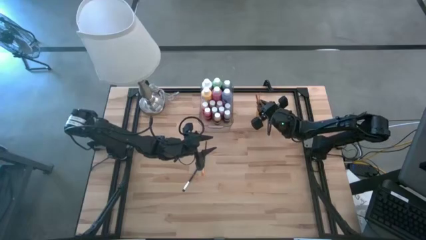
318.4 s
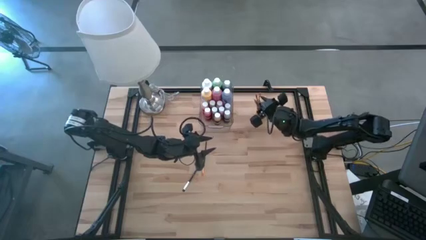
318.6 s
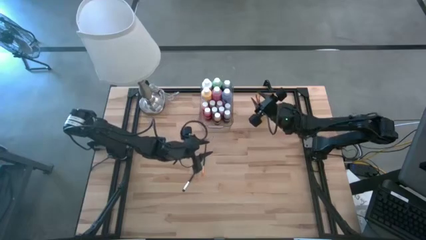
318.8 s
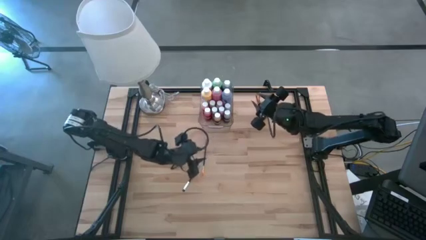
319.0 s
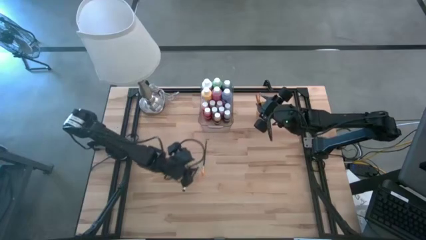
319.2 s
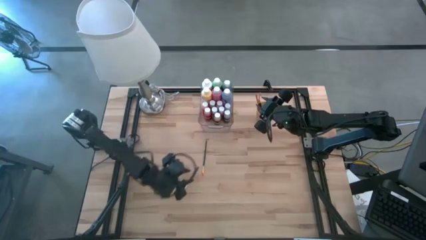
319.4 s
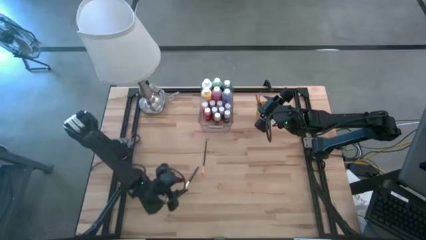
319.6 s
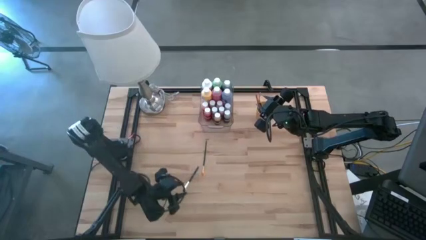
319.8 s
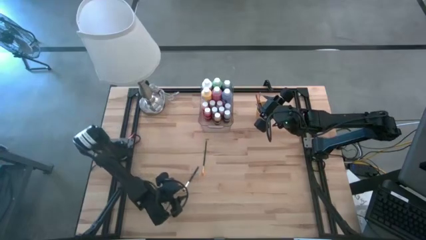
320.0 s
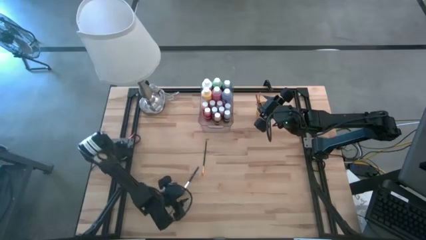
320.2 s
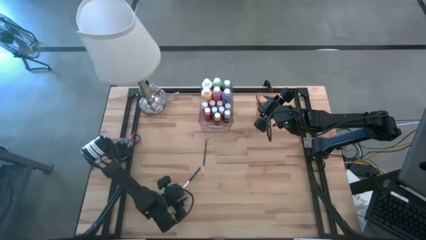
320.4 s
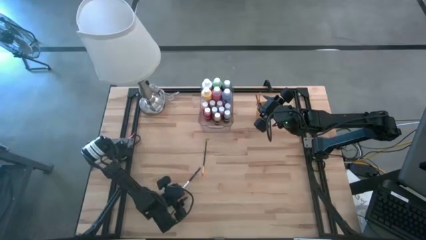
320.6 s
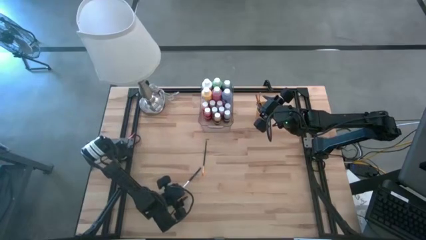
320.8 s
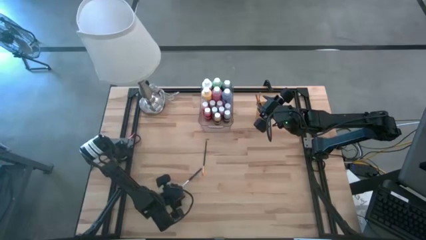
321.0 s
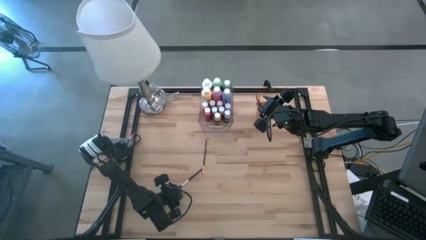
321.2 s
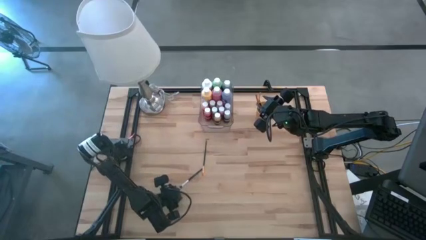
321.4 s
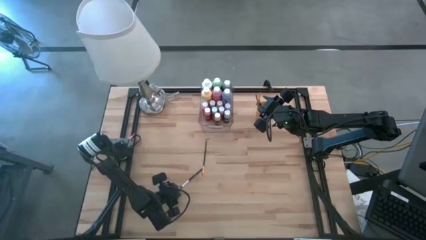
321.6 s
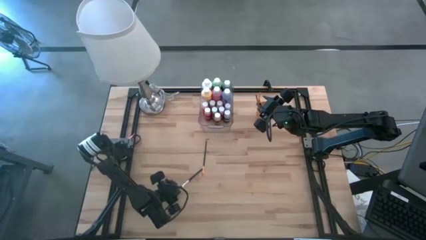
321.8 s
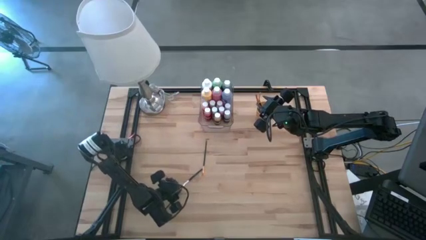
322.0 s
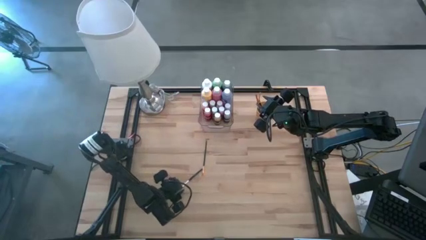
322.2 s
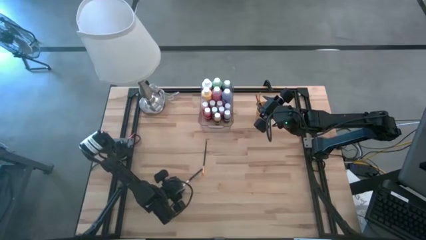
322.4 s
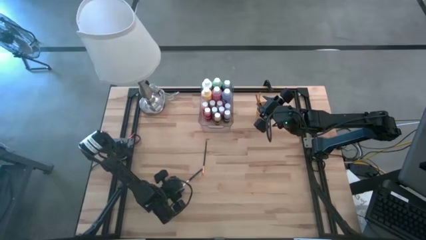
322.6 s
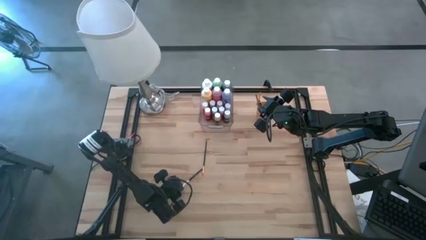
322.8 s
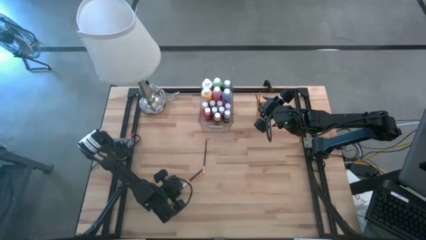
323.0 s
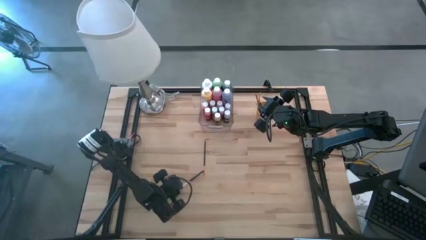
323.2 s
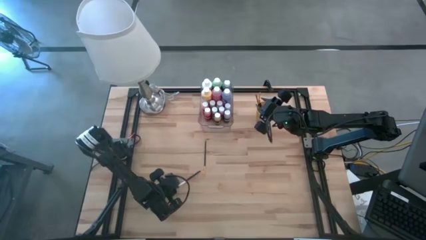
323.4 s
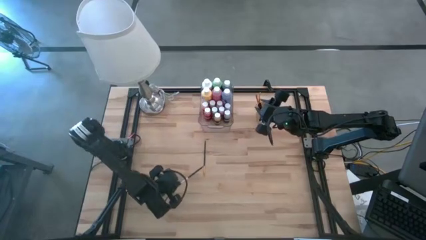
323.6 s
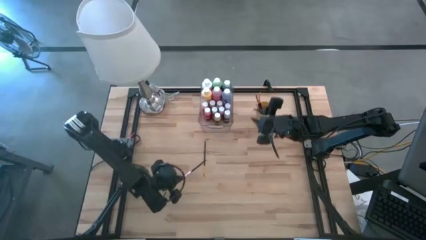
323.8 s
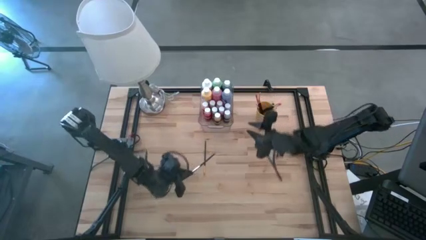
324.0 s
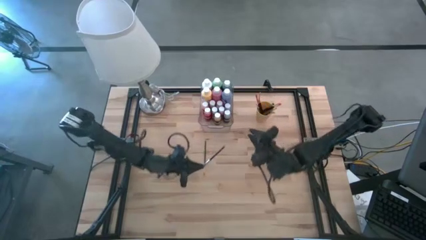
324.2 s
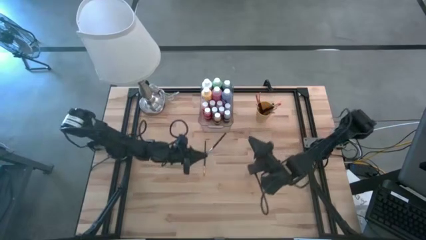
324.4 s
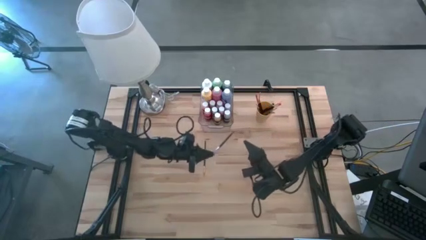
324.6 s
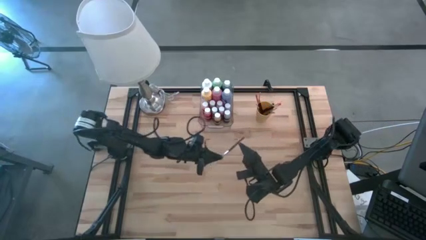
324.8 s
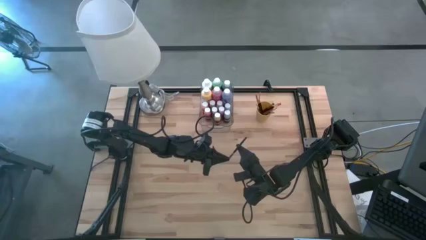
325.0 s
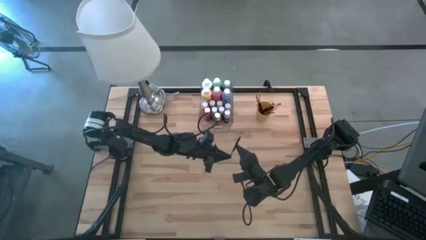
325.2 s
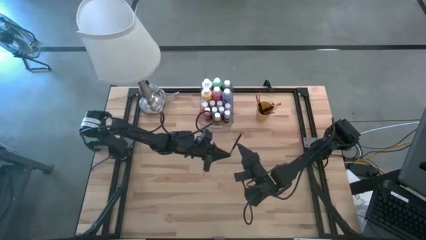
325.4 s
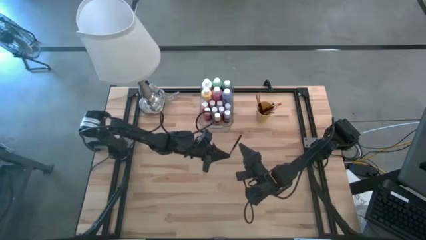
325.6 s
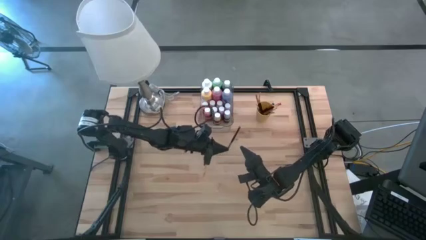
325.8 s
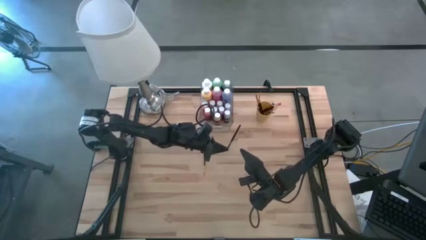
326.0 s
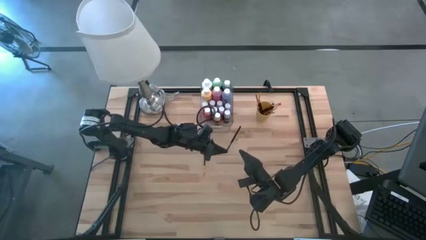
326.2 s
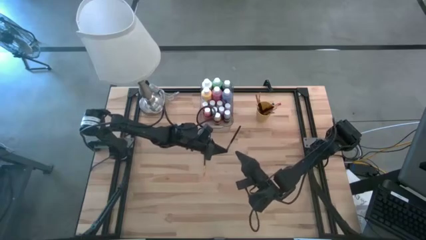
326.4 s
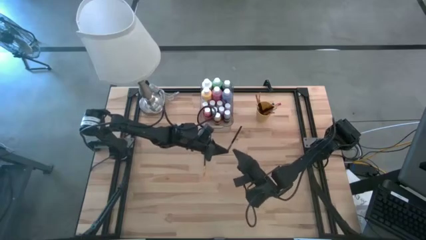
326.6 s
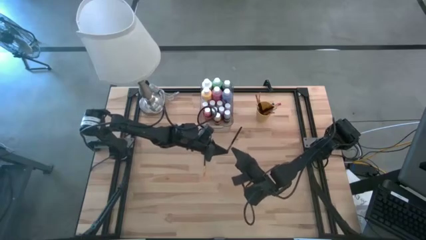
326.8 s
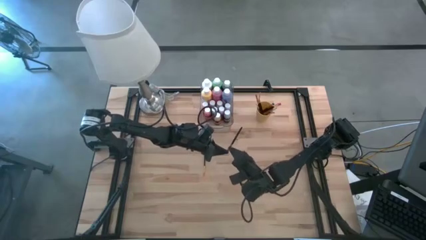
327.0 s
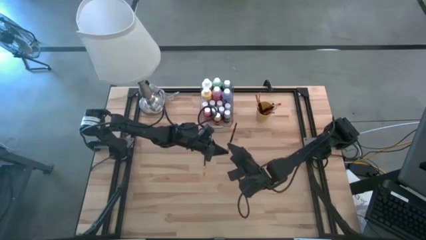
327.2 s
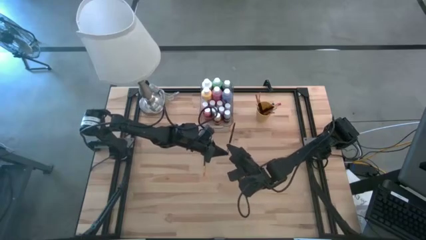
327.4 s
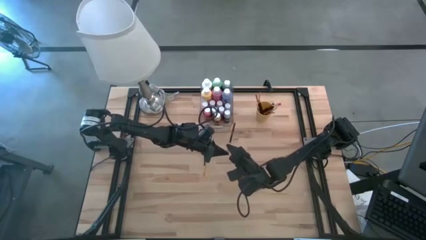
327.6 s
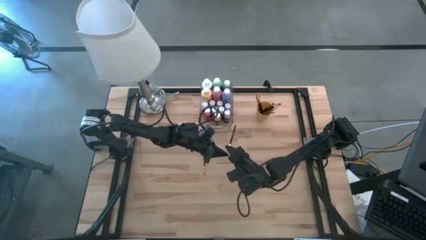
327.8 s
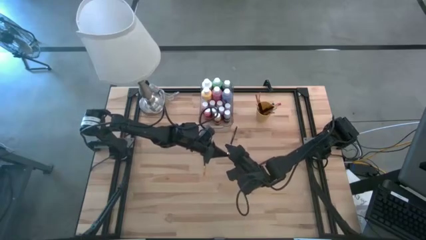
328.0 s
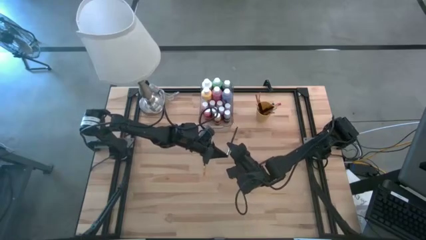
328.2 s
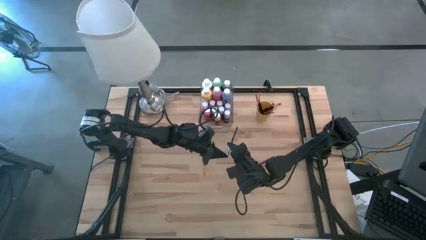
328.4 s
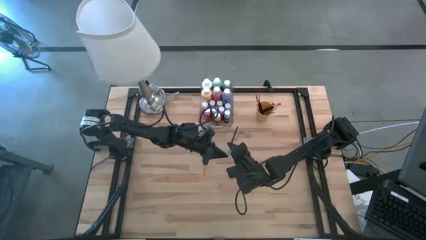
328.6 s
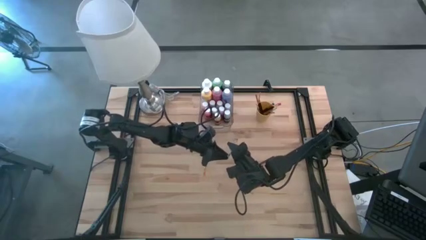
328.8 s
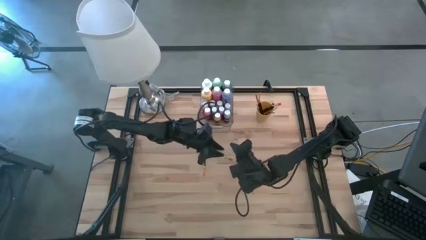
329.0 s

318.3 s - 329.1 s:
Task: Pick & Place Paint Supplies
Put the silver paint brush into the cup

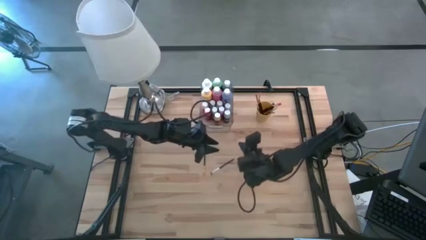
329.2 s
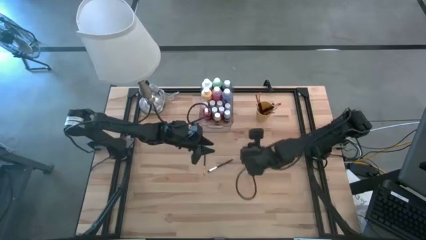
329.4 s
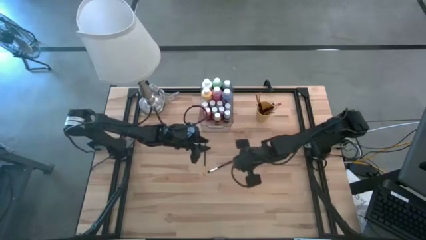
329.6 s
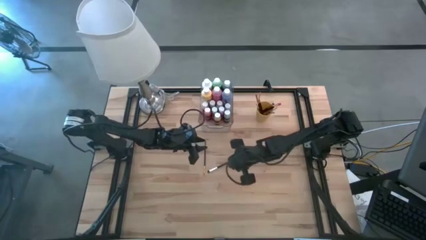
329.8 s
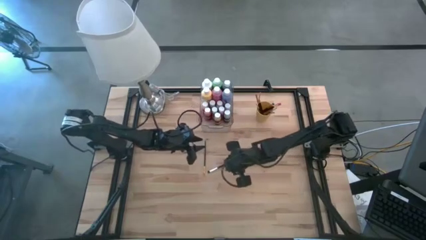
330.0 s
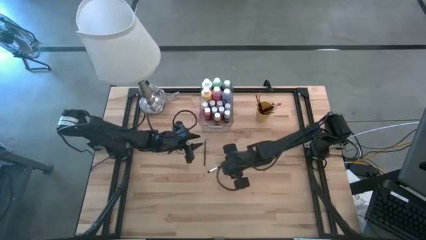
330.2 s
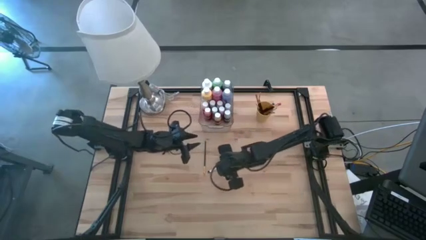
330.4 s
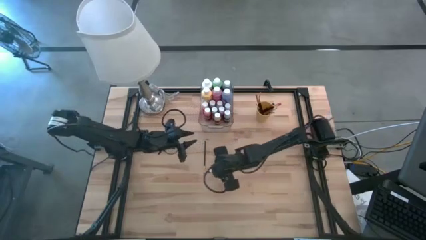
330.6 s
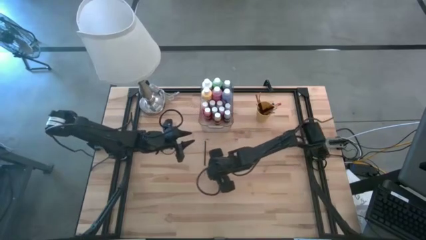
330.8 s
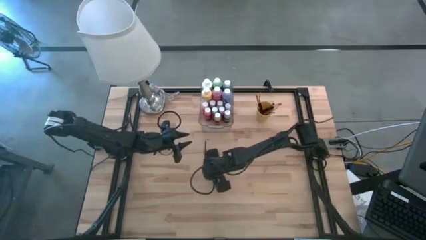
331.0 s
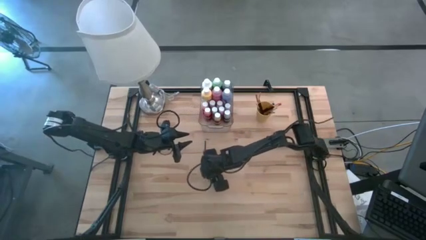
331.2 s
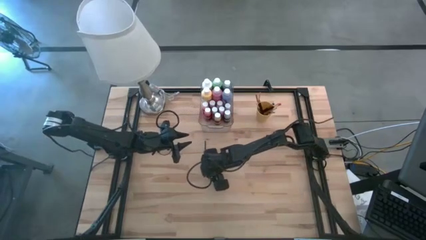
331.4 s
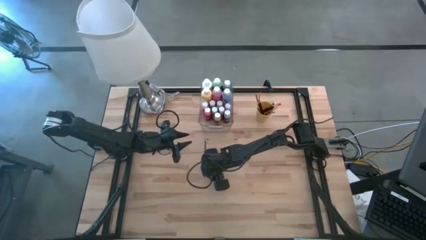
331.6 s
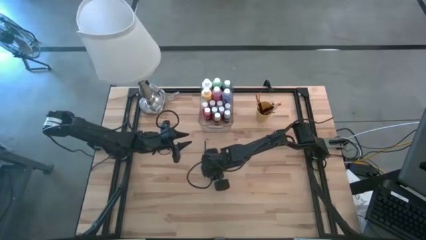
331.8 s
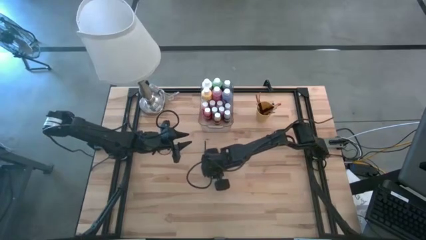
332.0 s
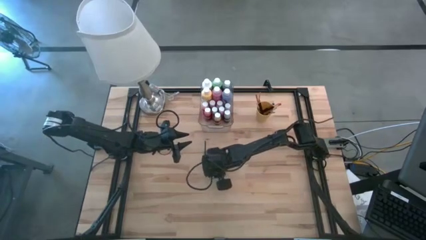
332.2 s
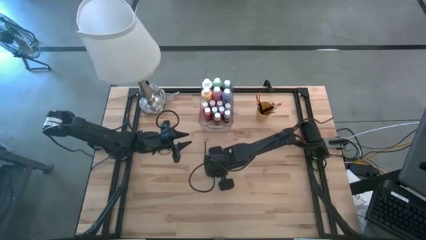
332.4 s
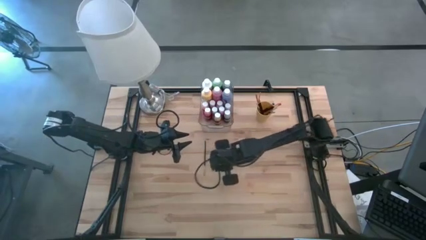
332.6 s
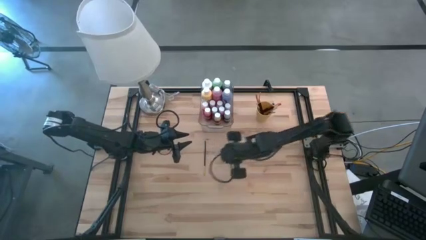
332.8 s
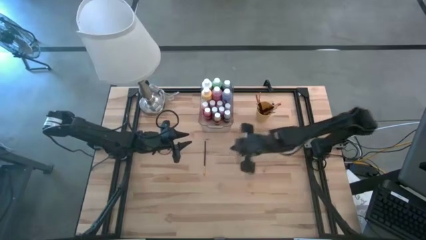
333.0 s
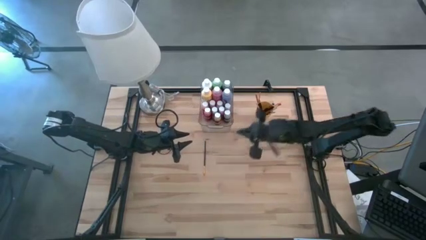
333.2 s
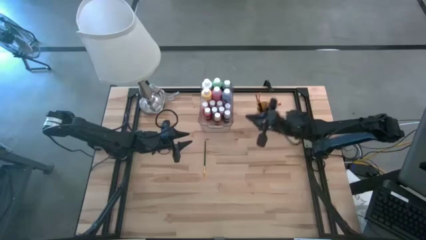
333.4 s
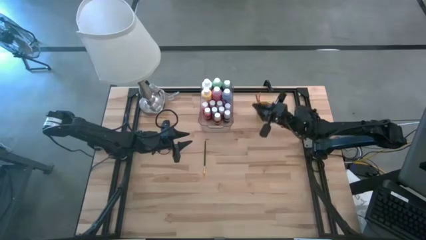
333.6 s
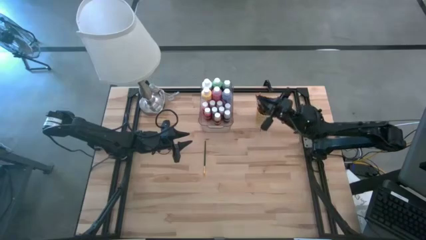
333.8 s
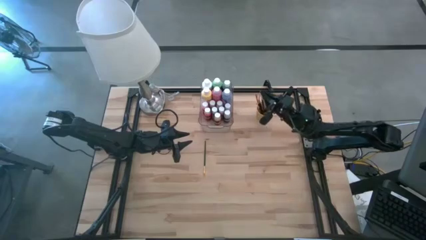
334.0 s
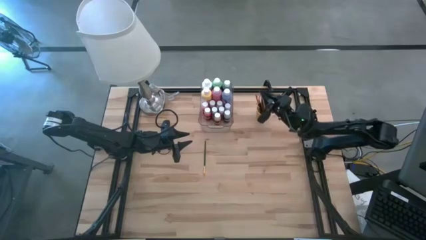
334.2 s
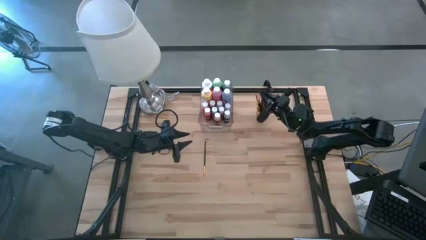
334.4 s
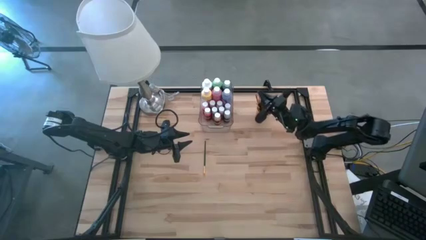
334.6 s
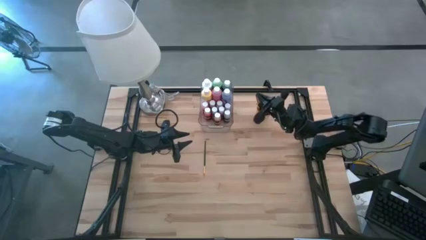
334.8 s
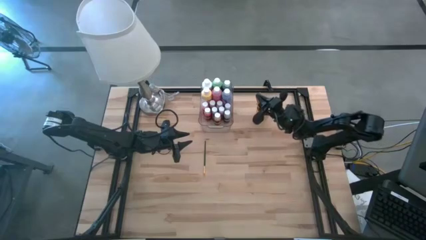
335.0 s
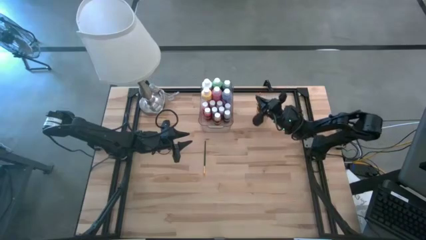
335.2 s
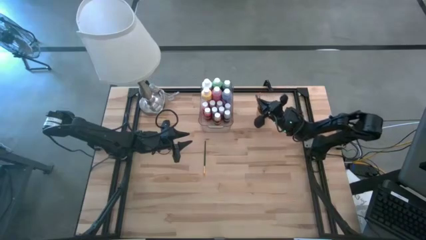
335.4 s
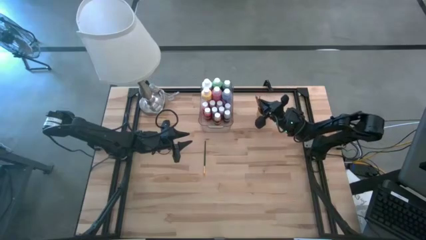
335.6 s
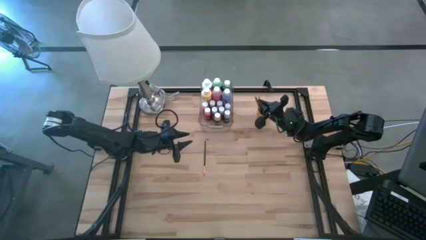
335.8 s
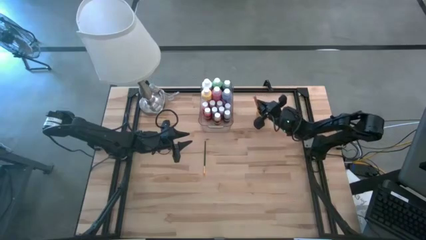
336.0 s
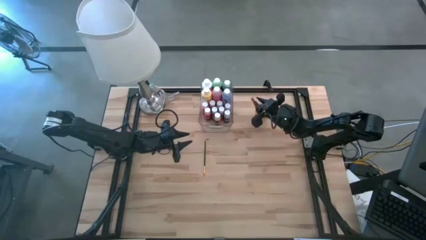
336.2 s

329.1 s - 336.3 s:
Put the silver paint brush into the cup
